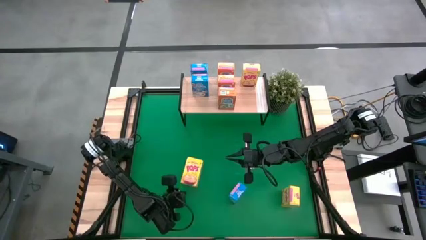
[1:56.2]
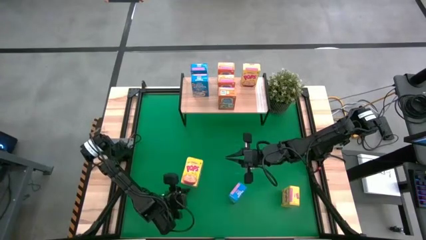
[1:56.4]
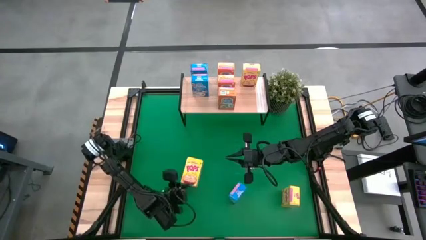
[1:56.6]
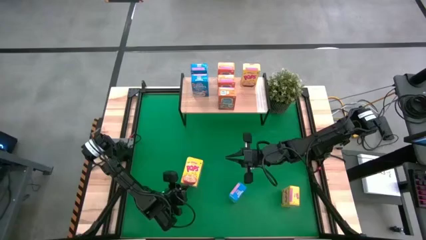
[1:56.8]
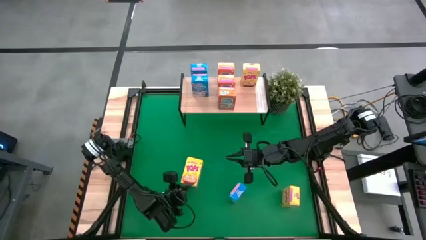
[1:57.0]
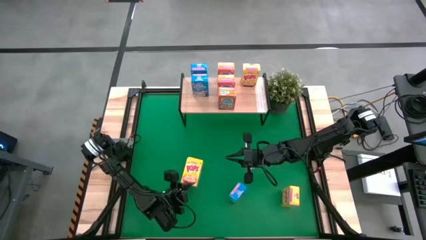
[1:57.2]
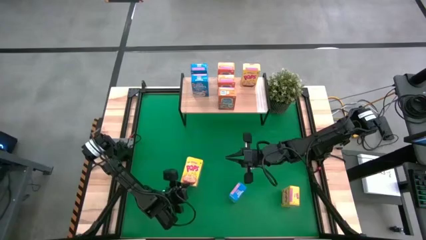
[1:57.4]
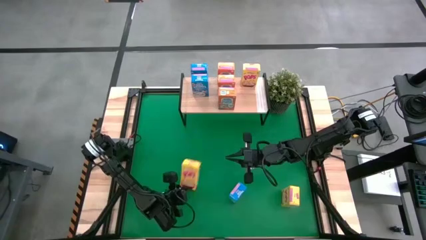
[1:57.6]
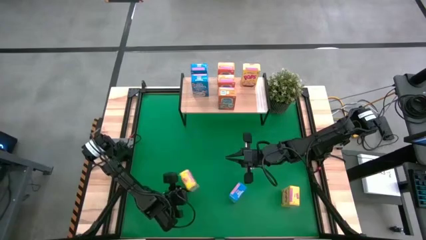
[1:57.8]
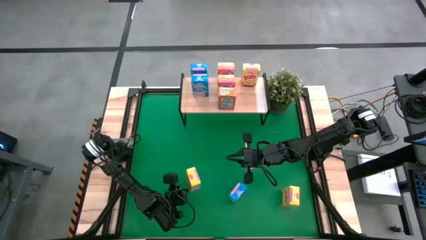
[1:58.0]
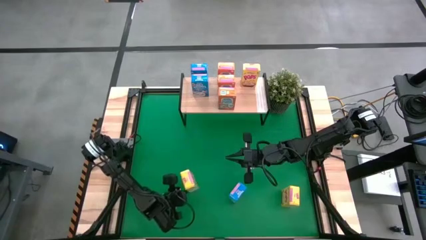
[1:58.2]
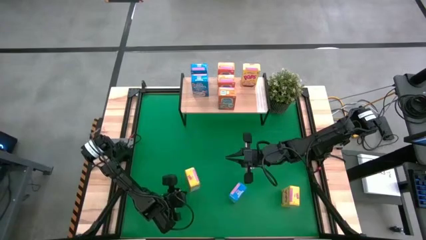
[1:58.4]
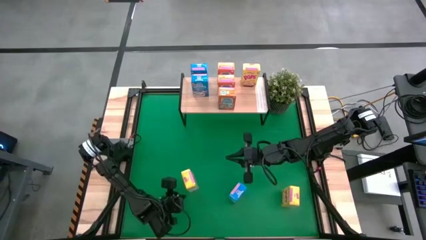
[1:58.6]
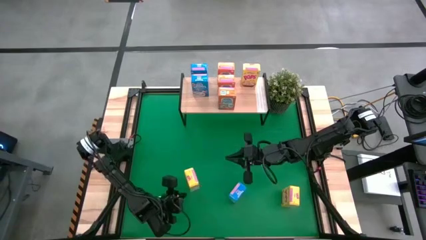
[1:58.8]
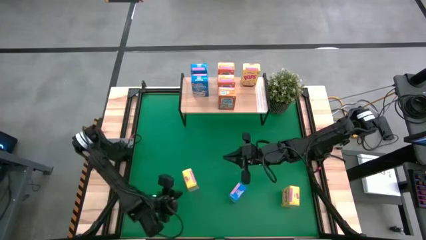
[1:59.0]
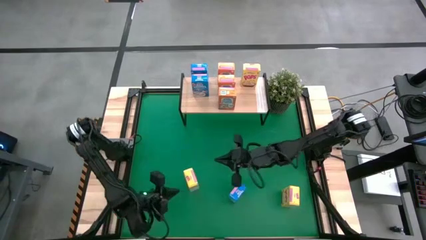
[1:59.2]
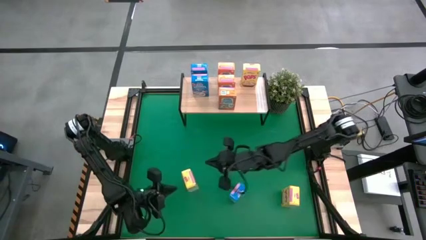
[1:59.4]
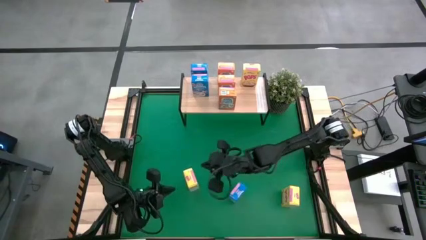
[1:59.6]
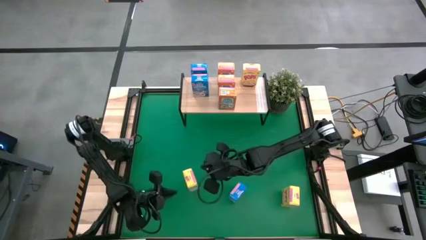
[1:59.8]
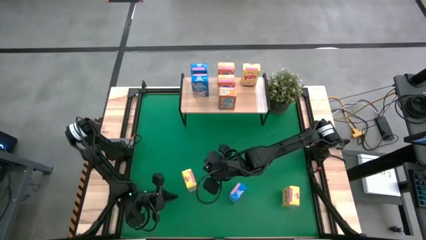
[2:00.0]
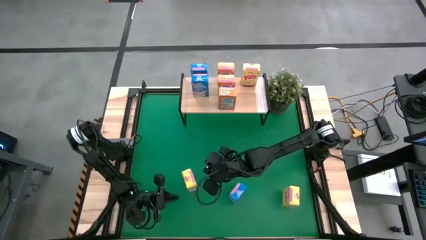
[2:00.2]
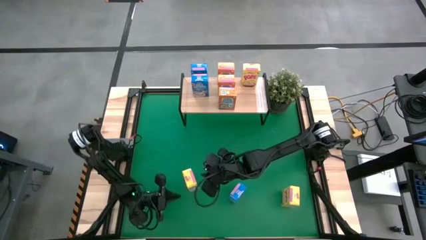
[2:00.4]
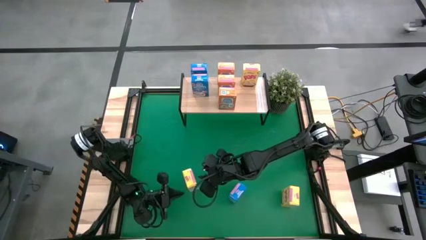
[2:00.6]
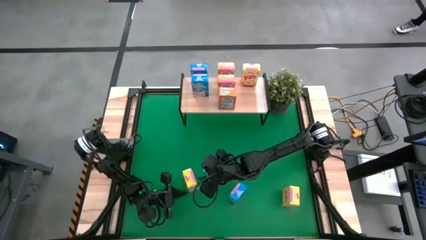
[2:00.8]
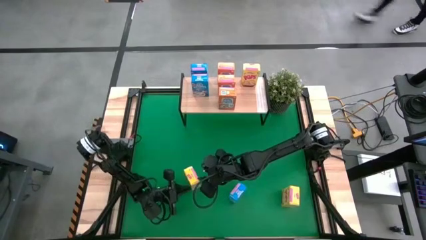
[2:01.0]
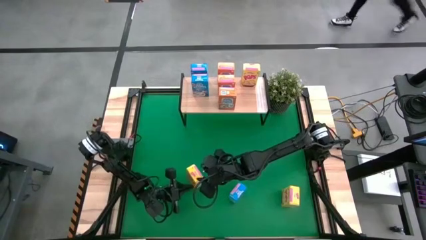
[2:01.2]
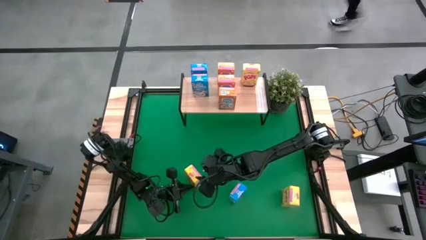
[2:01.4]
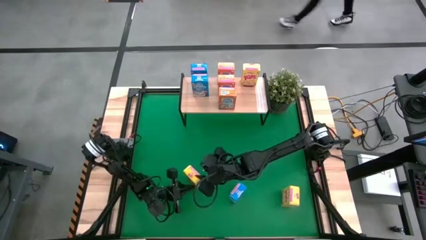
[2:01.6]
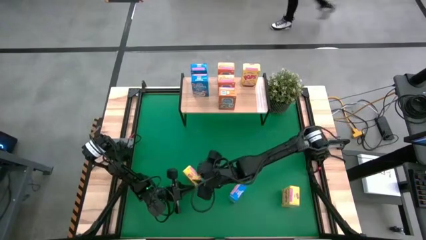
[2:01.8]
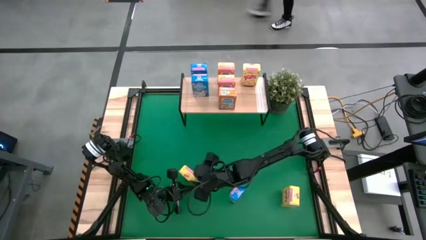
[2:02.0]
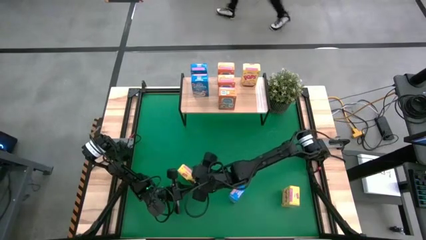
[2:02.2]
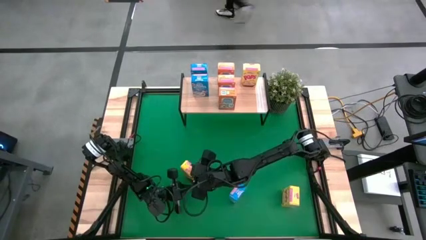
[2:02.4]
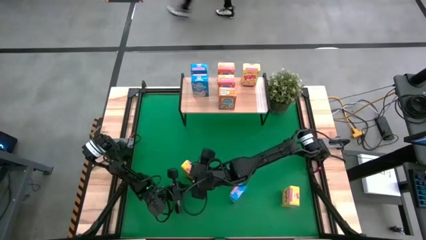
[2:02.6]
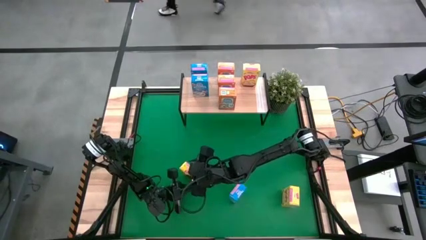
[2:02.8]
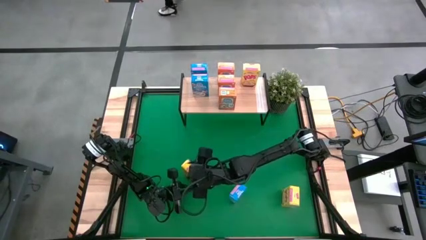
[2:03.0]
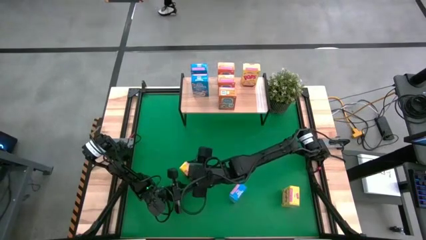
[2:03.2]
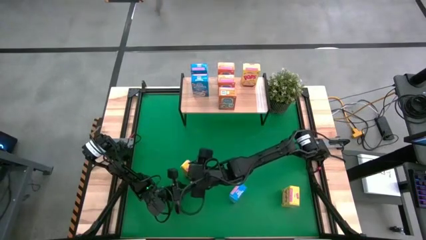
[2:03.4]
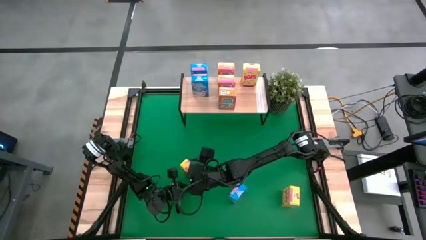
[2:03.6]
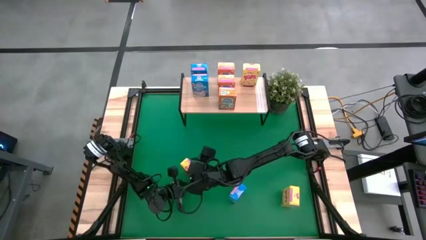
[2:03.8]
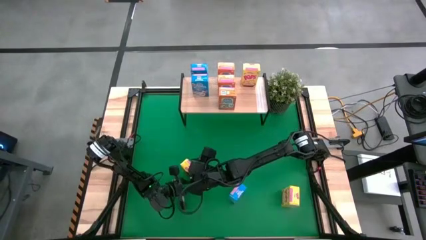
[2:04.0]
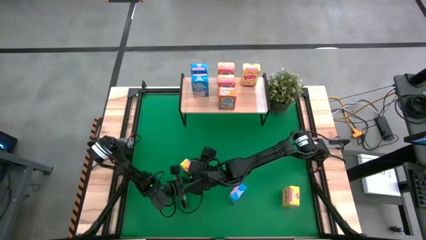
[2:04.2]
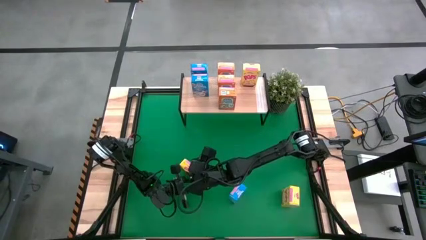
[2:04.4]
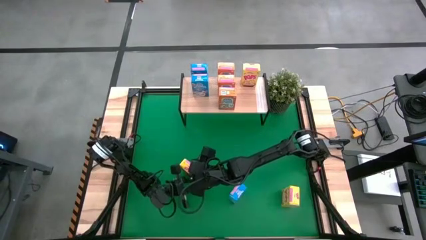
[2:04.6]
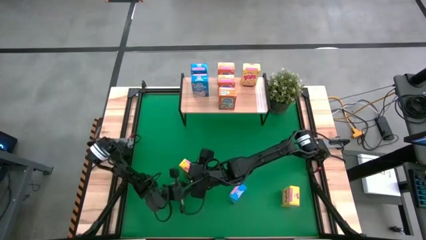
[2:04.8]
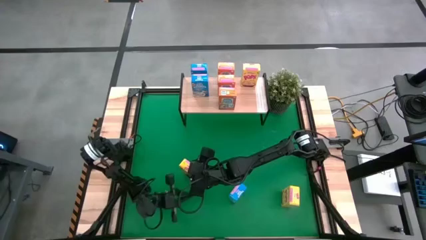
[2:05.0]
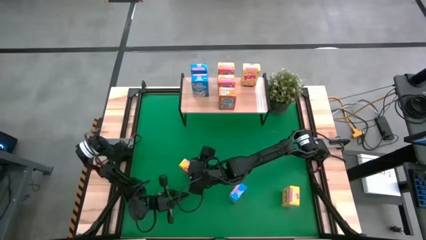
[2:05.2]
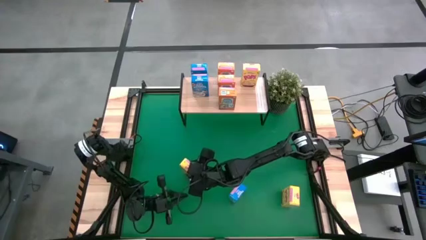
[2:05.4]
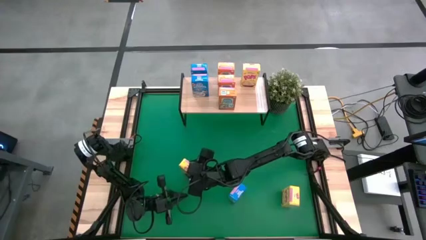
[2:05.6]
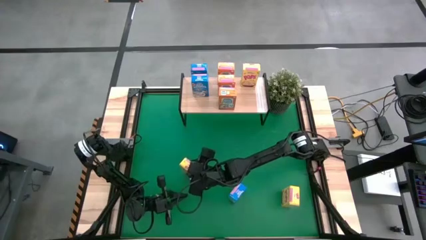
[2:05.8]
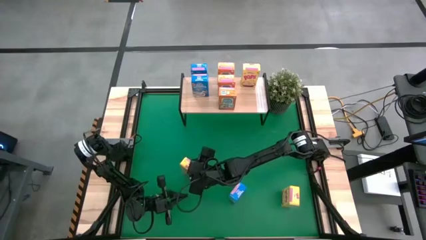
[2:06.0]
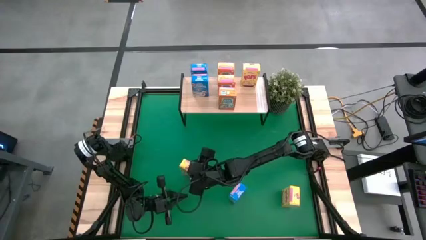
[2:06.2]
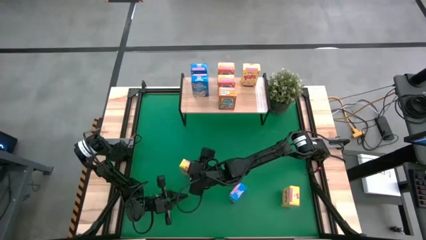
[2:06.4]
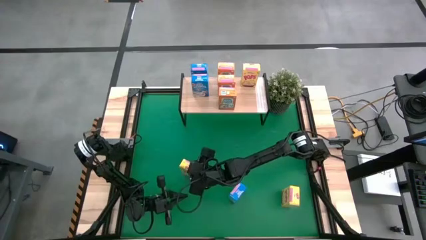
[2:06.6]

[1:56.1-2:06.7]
Task: Stack cereal on shelf
Put the left yellow cereal box on the shelf

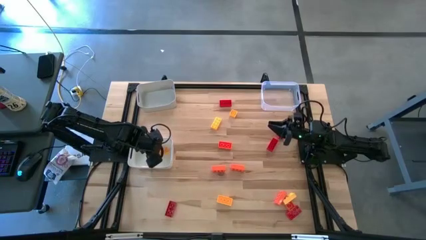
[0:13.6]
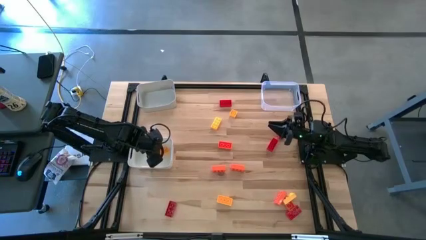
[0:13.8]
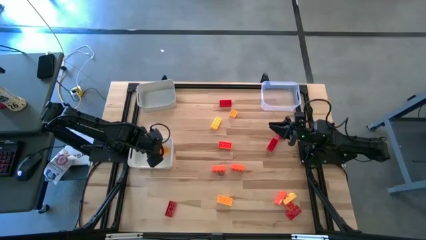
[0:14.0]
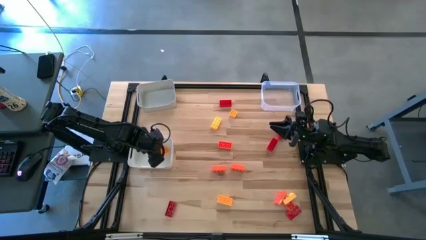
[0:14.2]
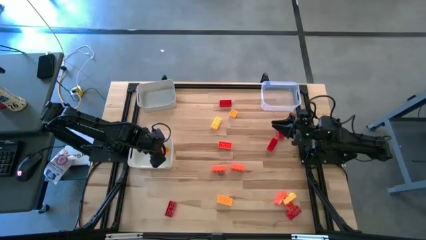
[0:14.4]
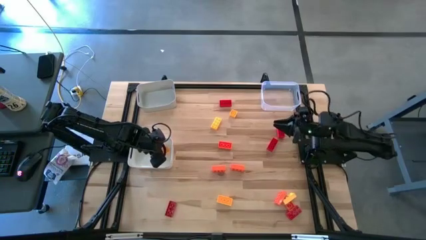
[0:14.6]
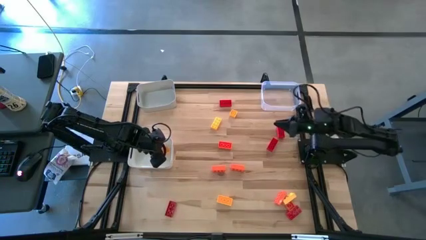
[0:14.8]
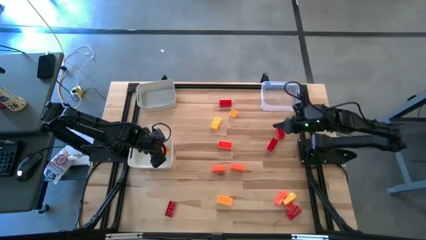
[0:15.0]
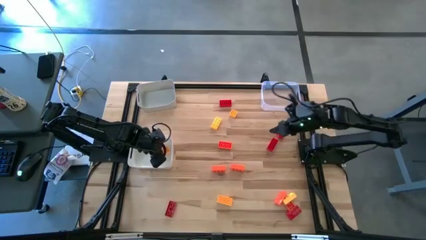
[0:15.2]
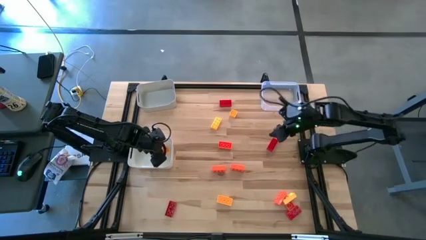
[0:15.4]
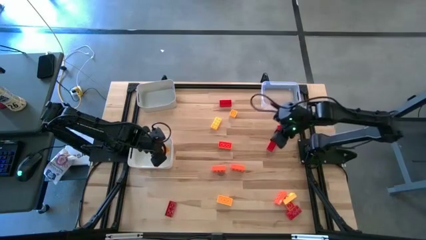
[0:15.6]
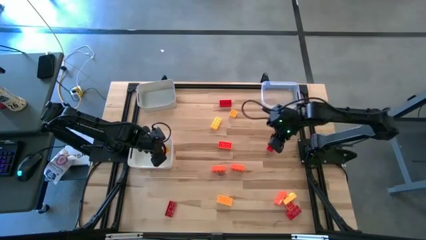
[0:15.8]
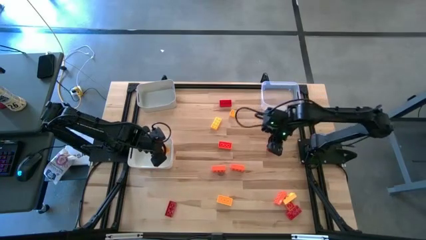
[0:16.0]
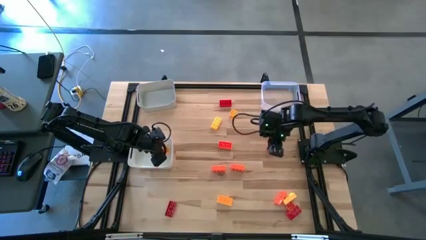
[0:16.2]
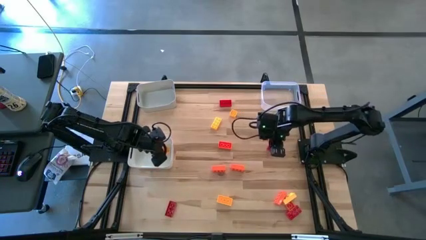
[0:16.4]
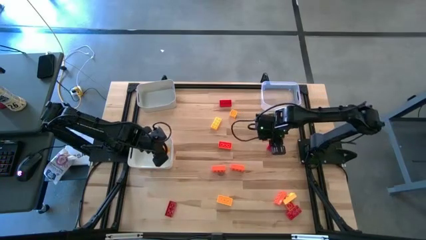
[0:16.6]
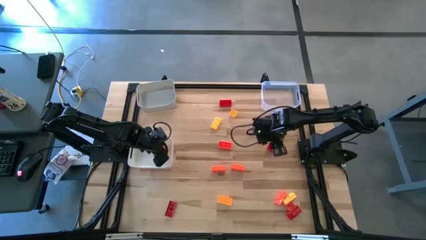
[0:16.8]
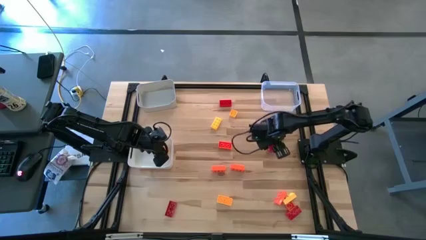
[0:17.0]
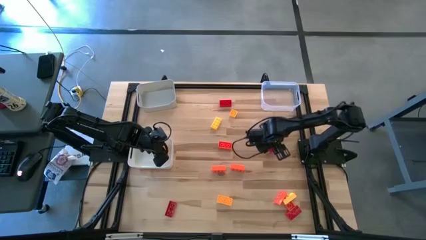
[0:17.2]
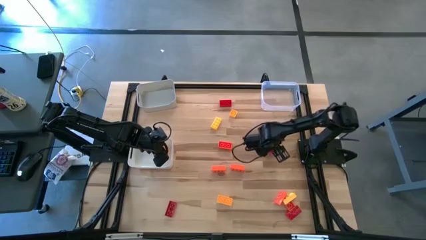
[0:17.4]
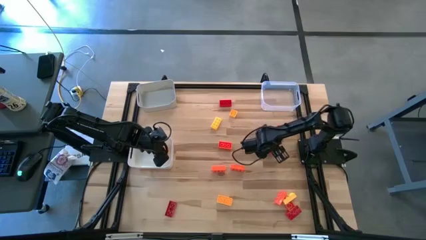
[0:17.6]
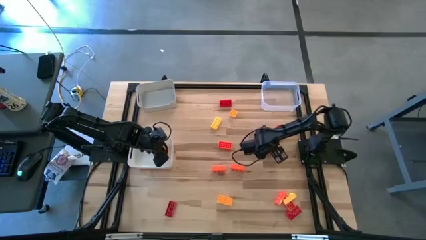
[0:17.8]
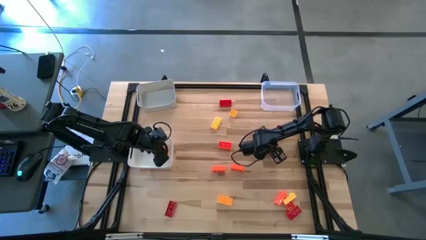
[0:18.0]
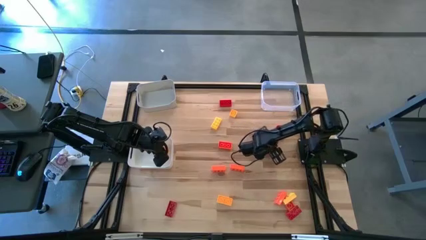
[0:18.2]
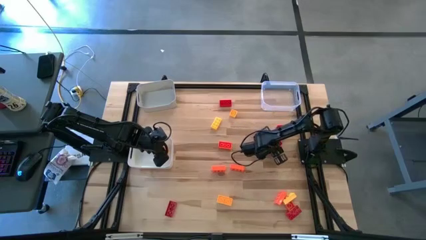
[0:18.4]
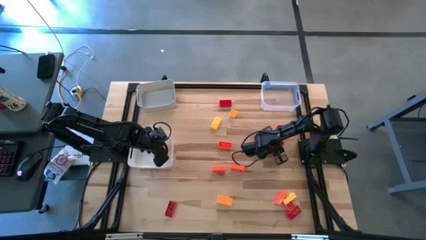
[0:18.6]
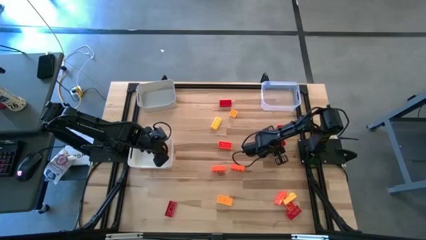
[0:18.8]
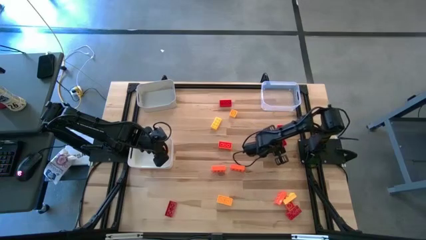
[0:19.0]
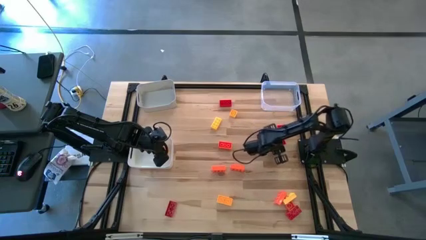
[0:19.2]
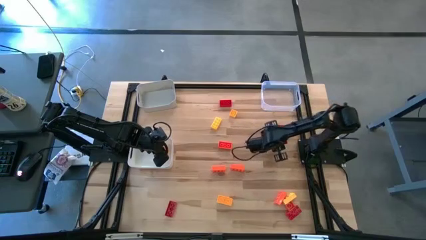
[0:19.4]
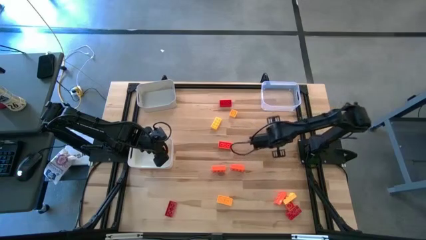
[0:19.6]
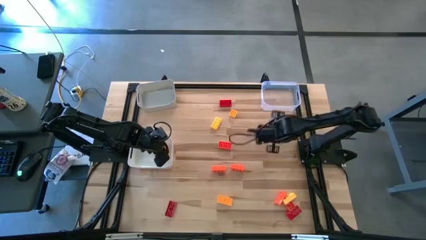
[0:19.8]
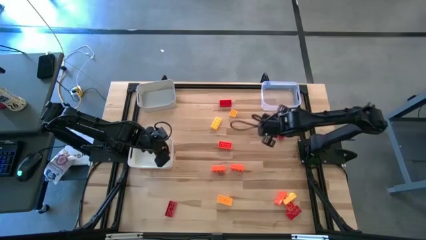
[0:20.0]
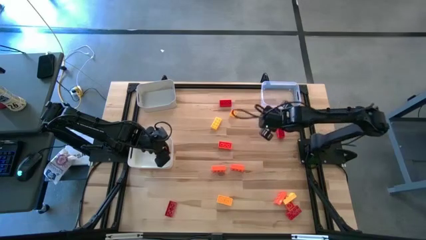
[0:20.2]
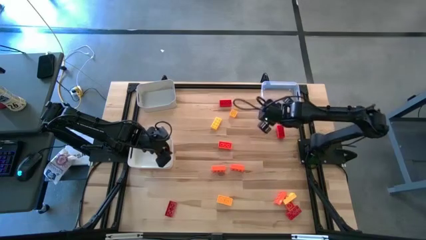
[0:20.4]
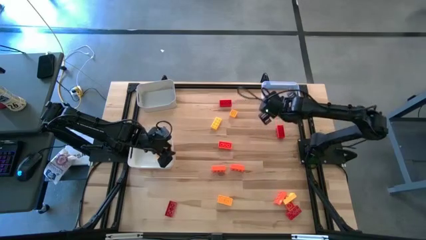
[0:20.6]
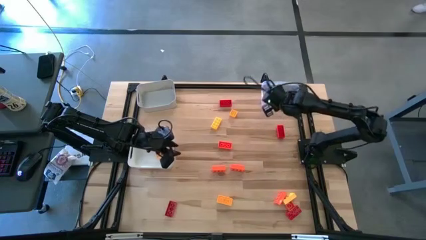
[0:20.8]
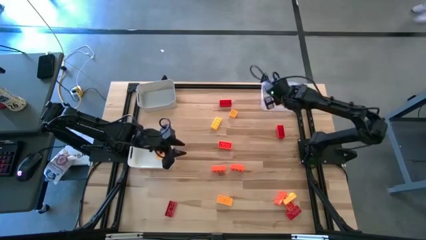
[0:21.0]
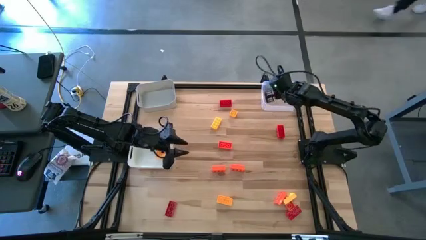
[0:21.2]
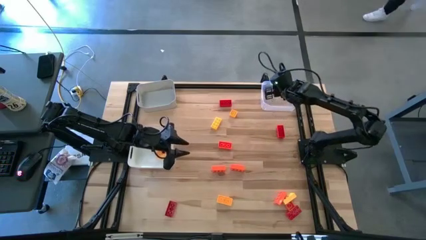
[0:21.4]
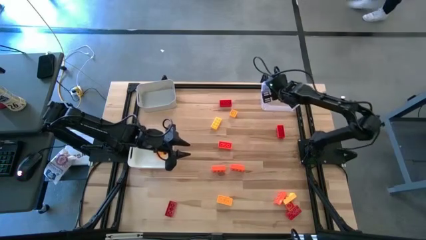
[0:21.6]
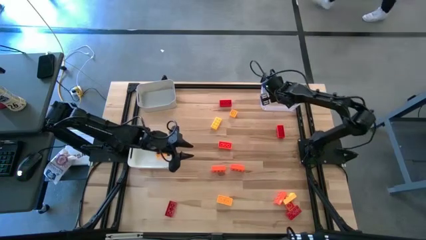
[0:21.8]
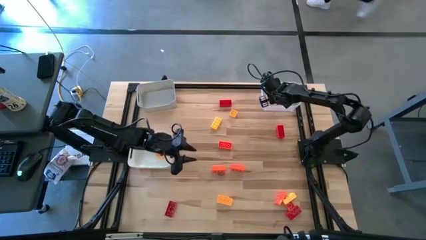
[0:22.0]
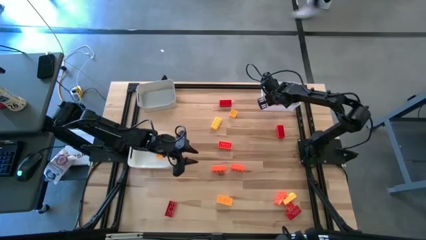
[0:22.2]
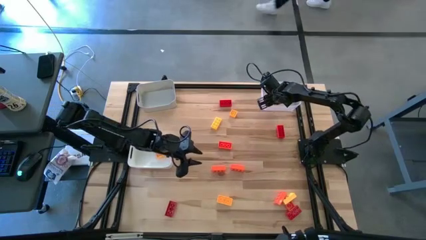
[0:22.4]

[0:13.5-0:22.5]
Task: Sort & place blocks by color
Put the red game piece into the transparent bin
